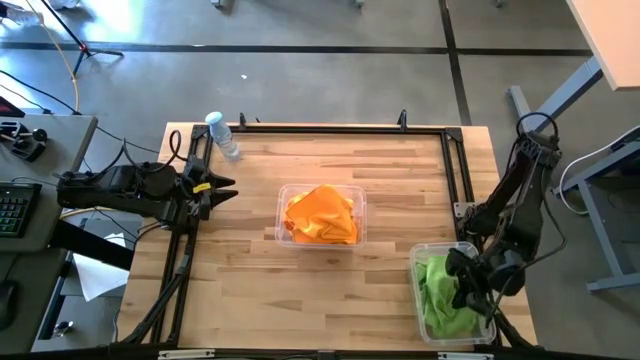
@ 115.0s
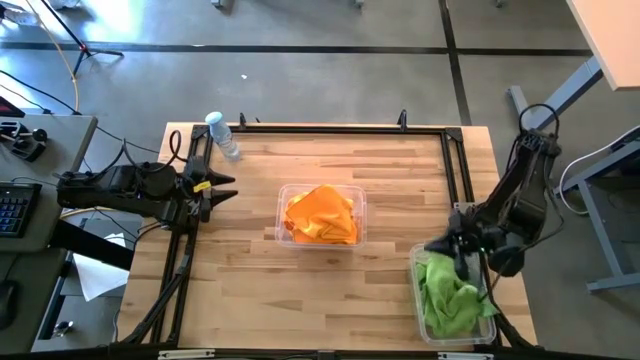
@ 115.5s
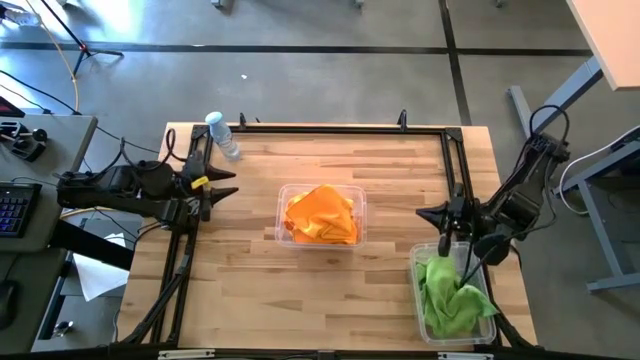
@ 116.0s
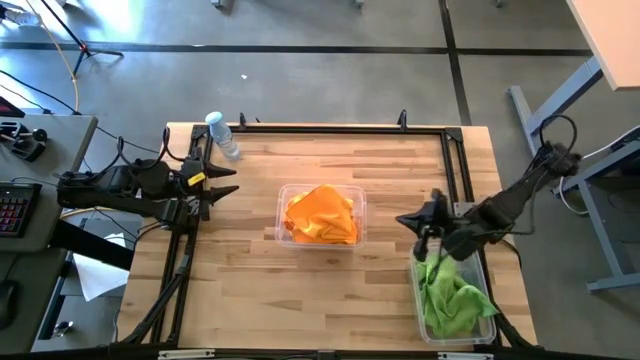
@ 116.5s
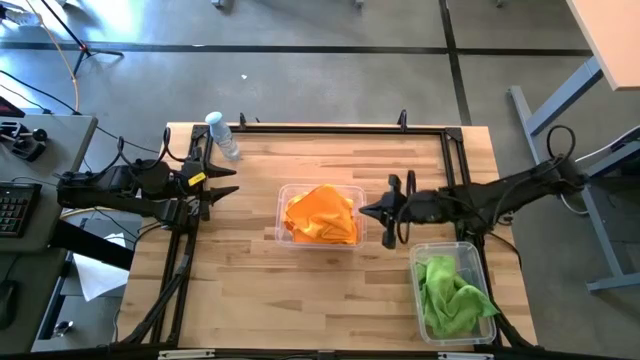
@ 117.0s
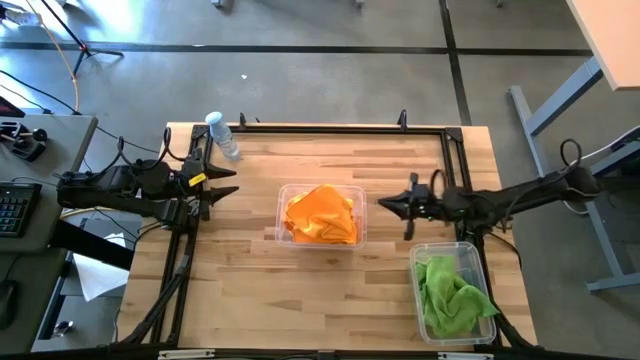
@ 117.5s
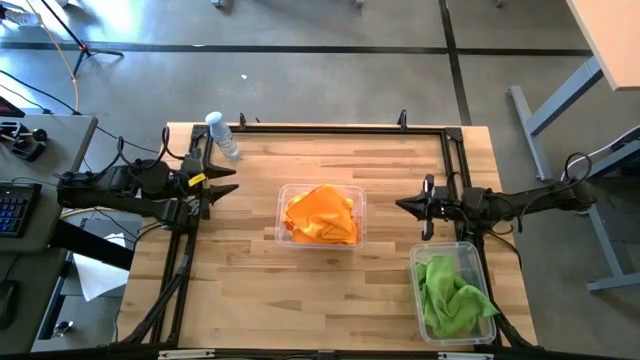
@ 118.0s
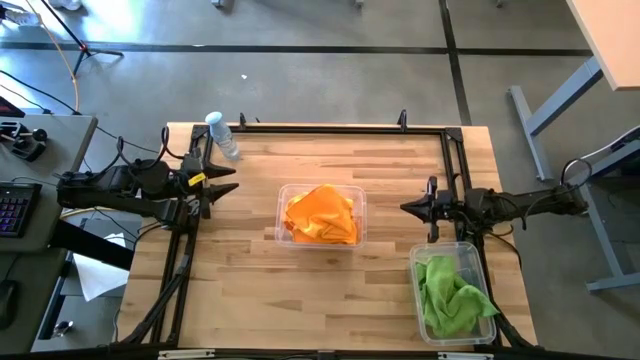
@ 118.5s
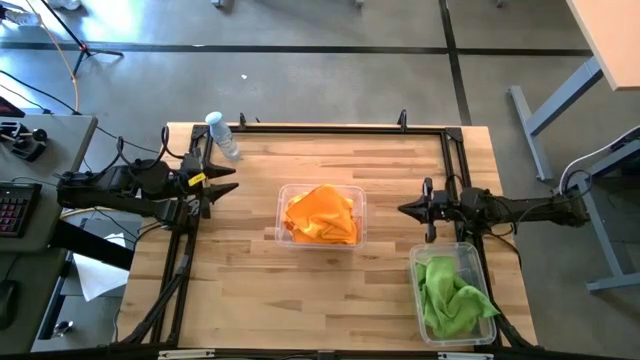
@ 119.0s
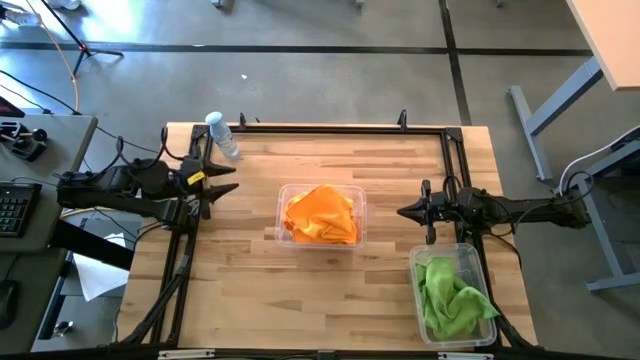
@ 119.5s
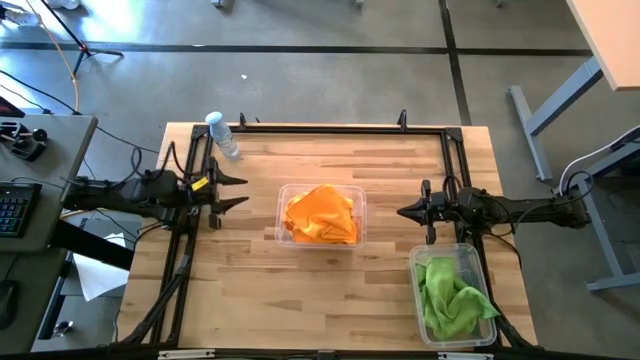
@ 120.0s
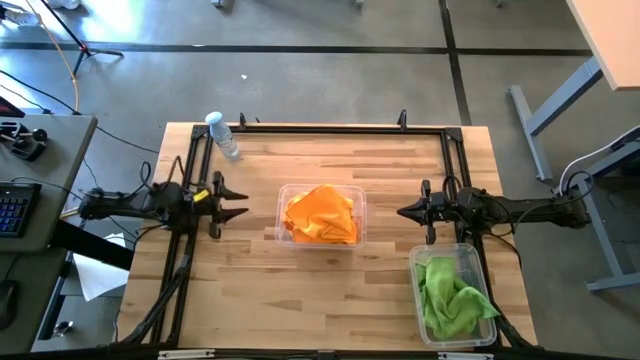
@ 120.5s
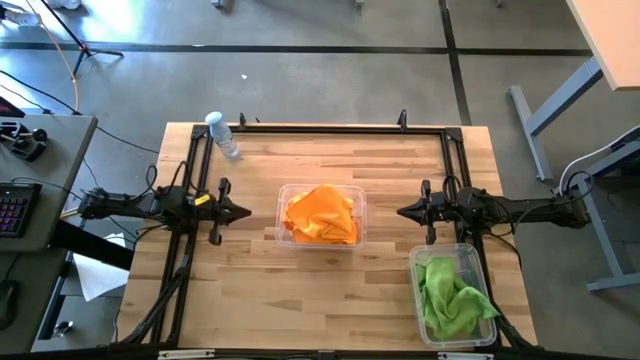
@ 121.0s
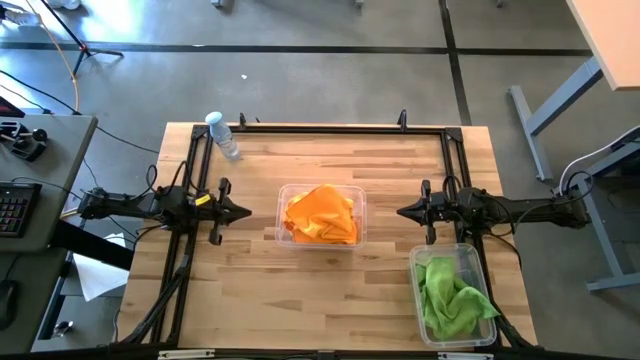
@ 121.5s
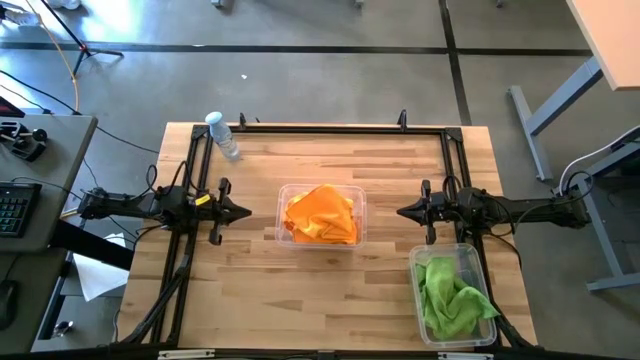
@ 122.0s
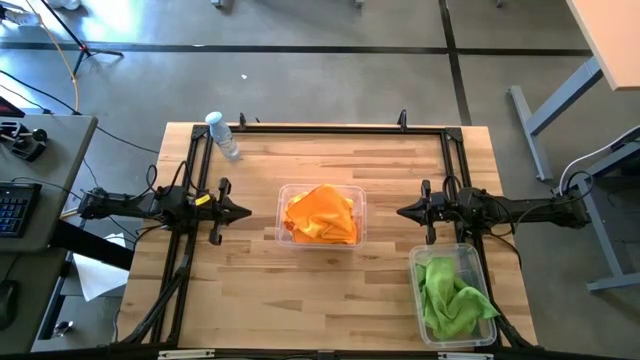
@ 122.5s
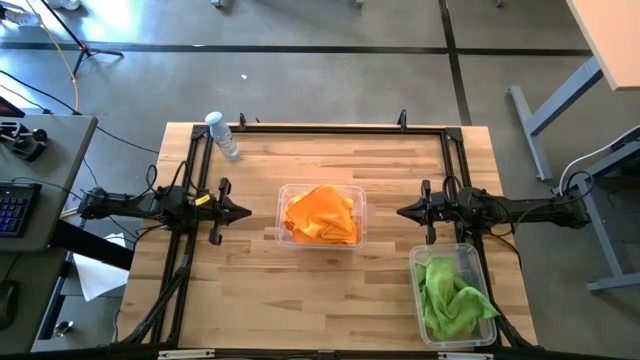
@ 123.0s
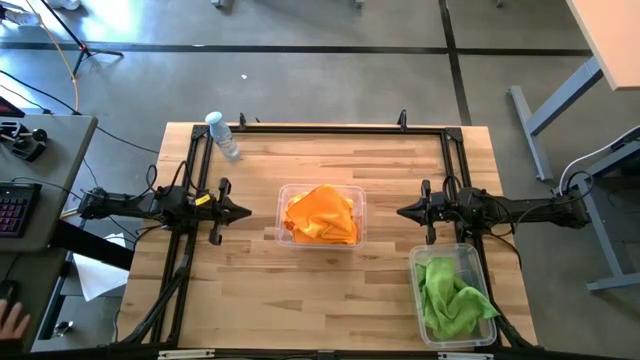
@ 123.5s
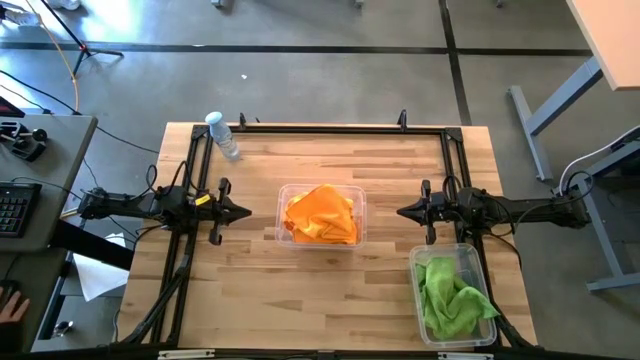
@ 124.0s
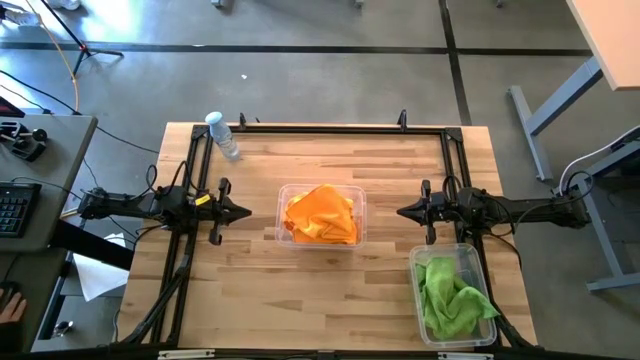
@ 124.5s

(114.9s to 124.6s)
Task: Sort microfiber towel by color & place in baskets
Return to Home Position

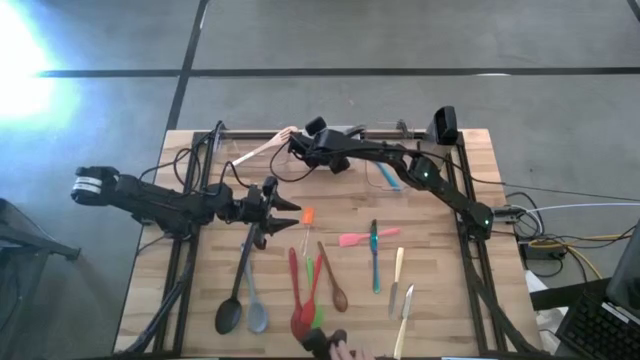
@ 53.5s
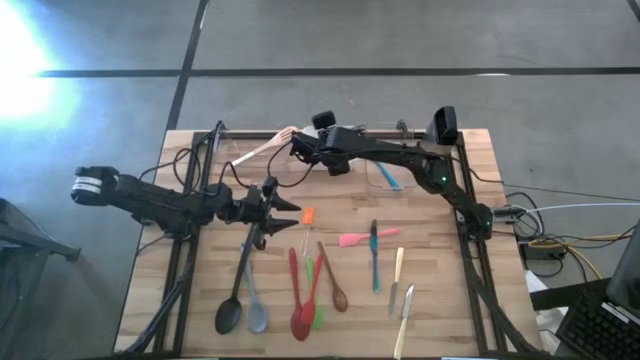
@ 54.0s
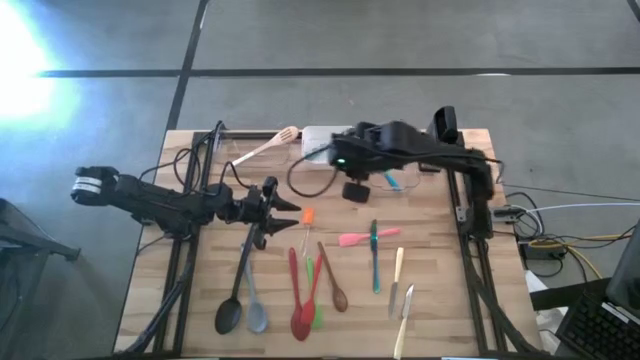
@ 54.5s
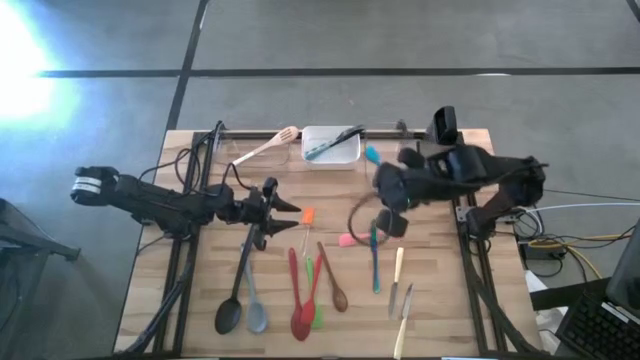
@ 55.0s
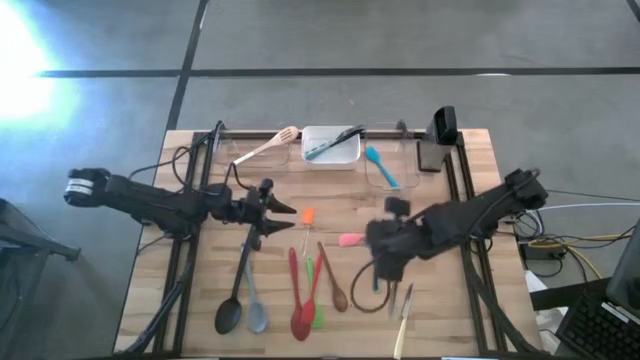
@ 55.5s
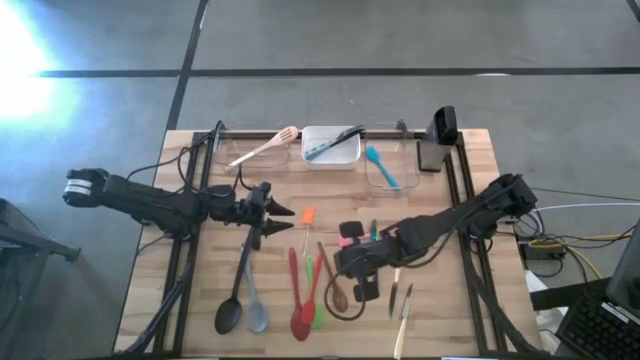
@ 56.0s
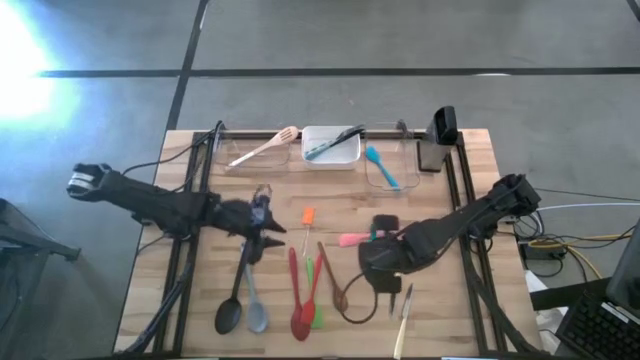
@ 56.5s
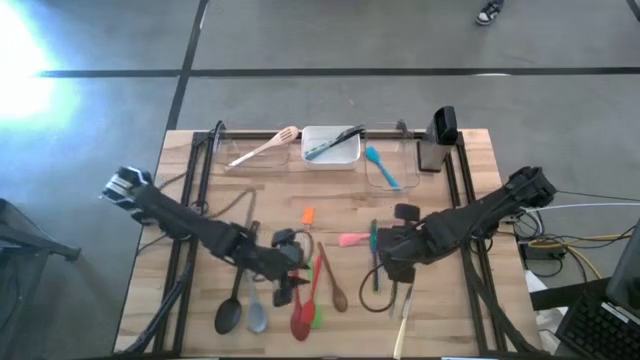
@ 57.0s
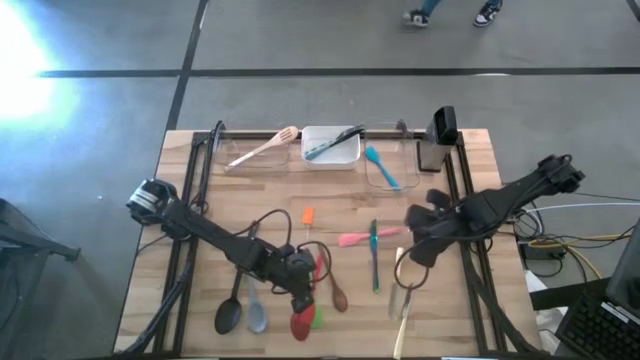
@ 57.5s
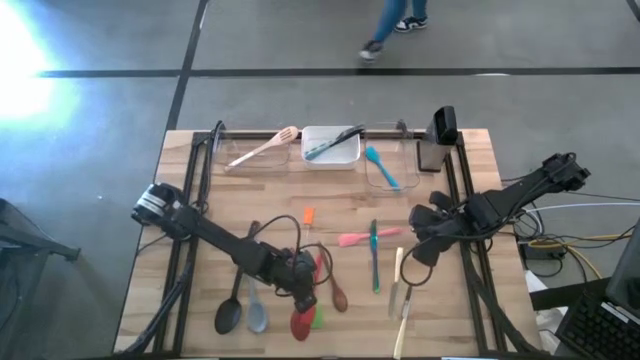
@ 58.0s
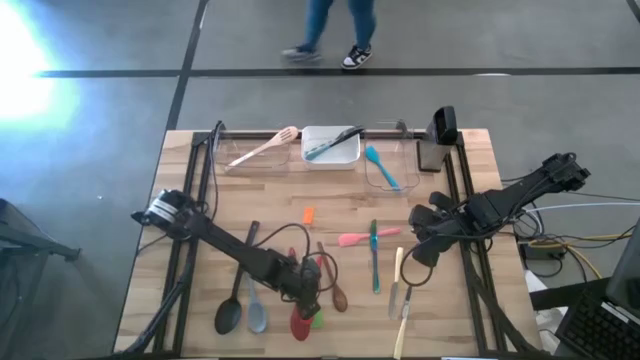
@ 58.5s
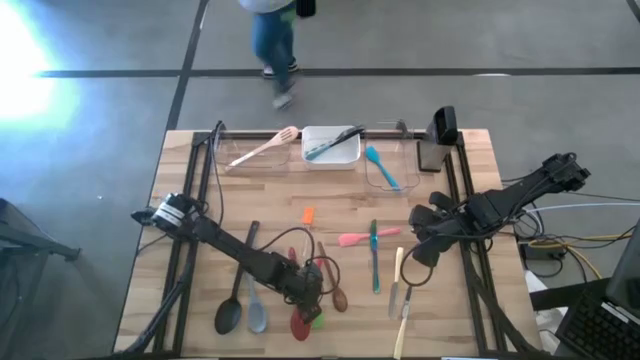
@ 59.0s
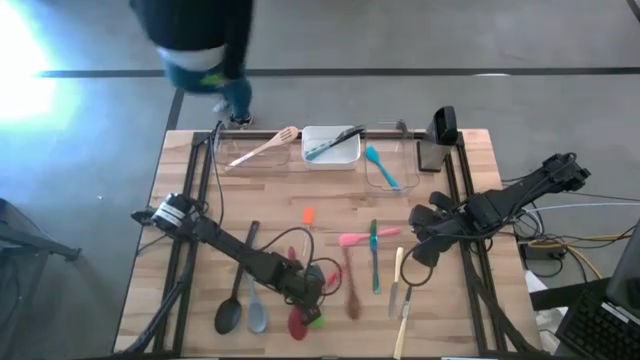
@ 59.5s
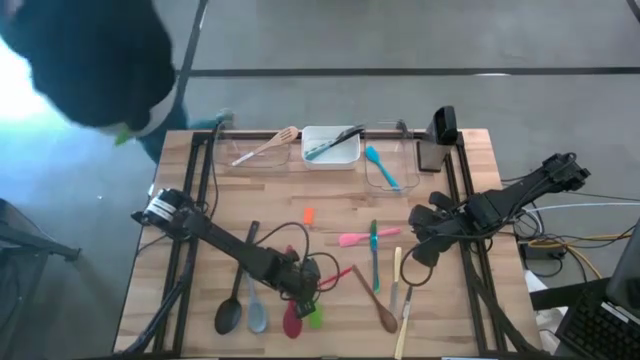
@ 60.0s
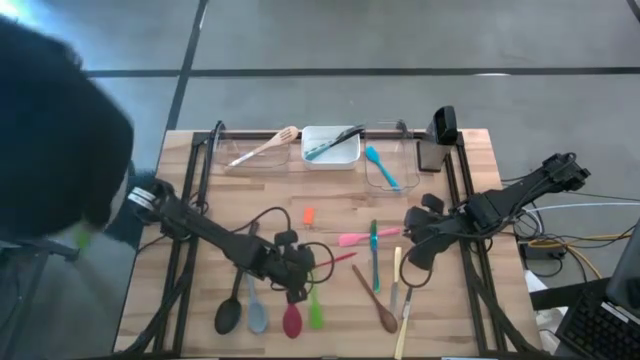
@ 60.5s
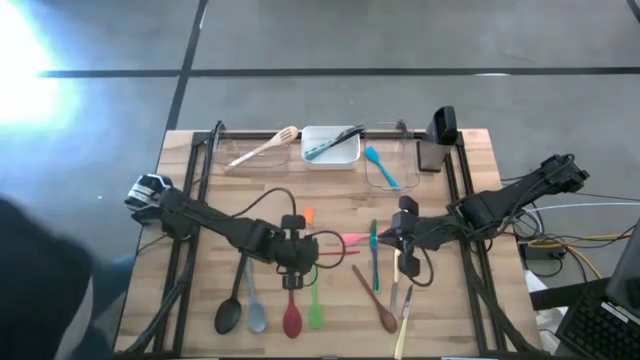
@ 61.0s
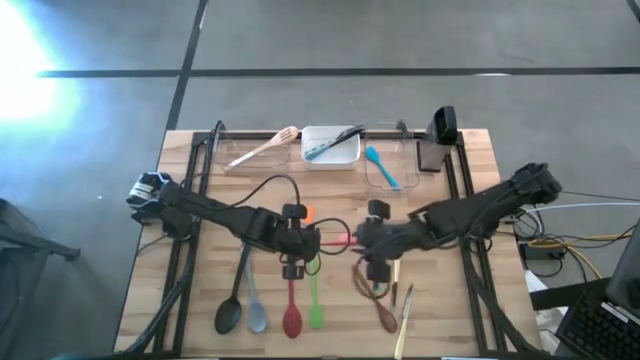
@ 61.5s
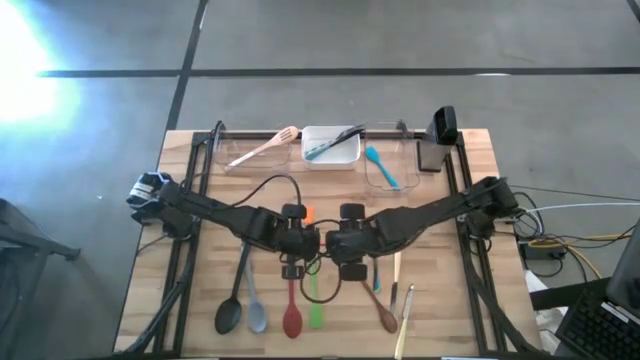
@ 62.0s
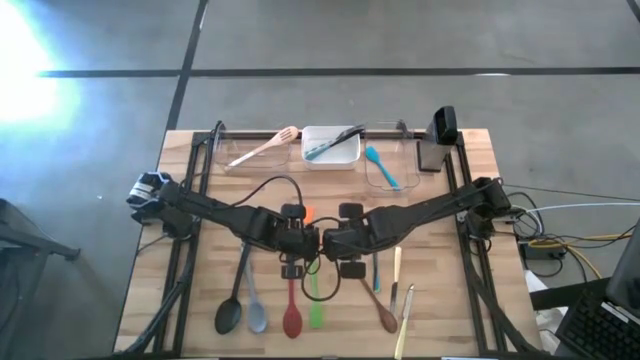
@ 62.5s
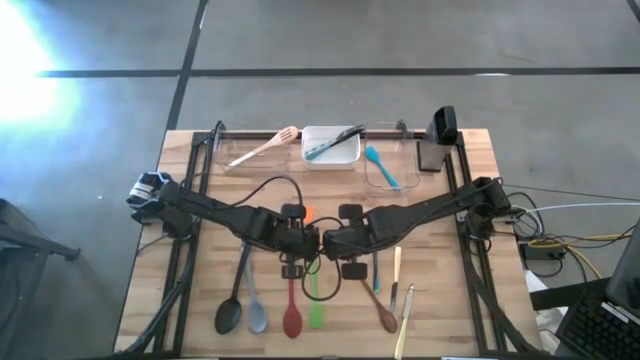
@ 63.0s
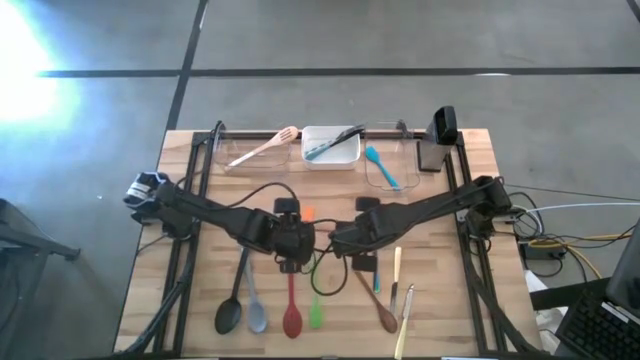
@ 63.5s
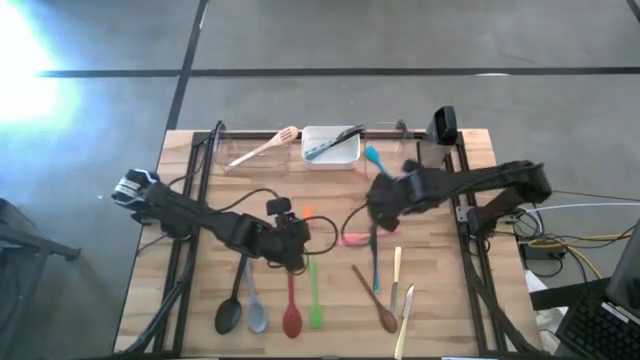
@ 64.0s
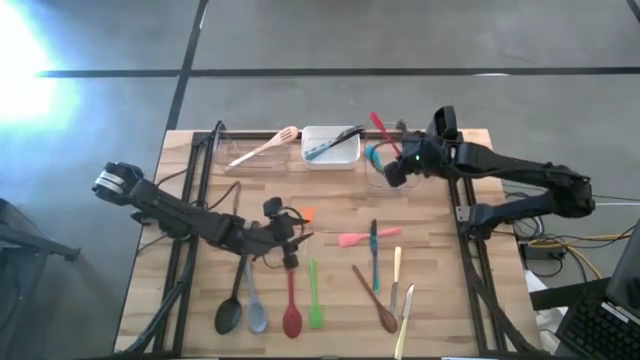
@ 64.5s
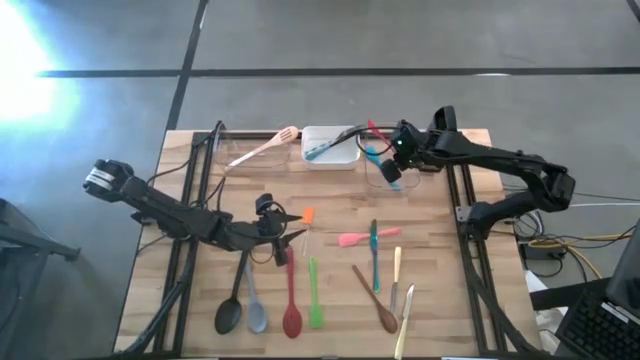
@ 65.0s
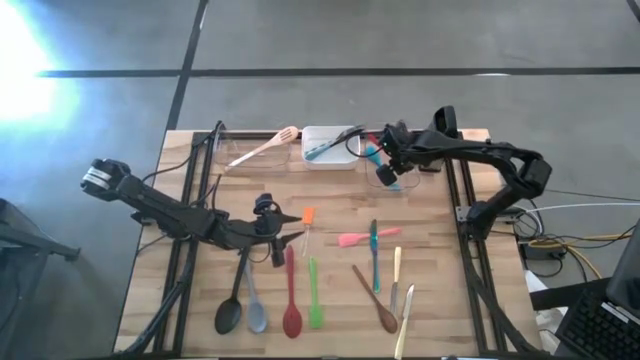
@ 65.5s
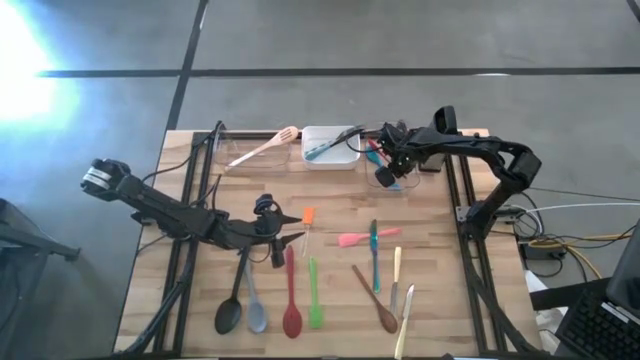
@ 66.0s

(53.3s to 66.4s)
Task: Pick & Place Kitchen Items
Put the red spatula into the right transparent bin
